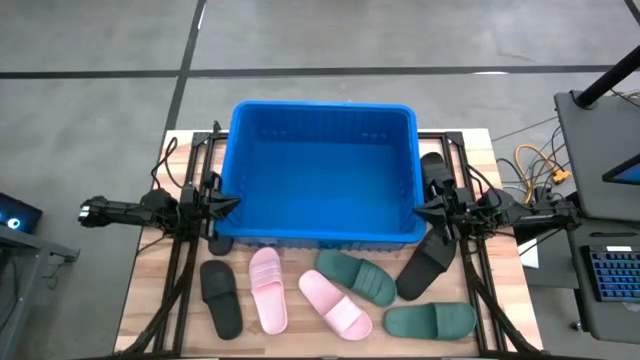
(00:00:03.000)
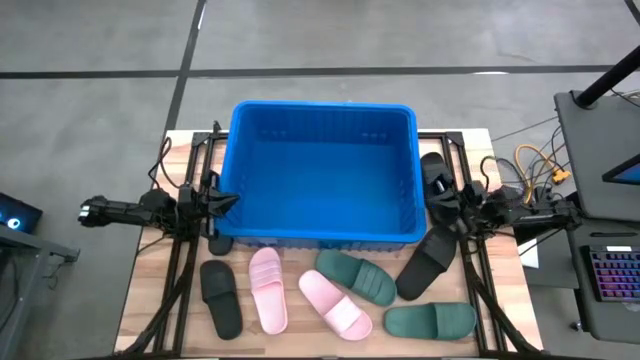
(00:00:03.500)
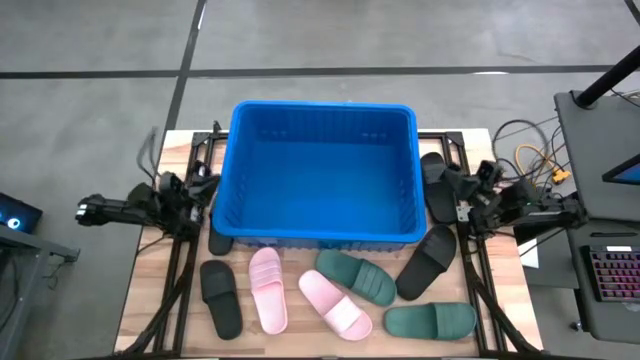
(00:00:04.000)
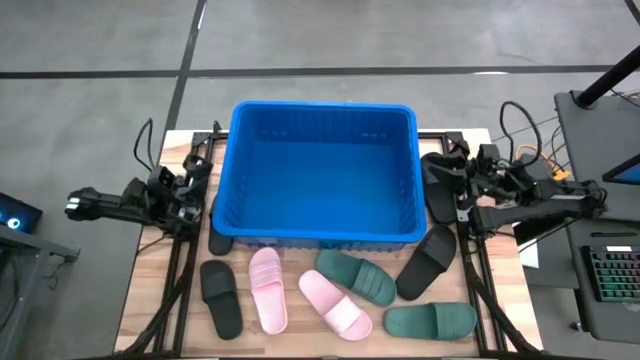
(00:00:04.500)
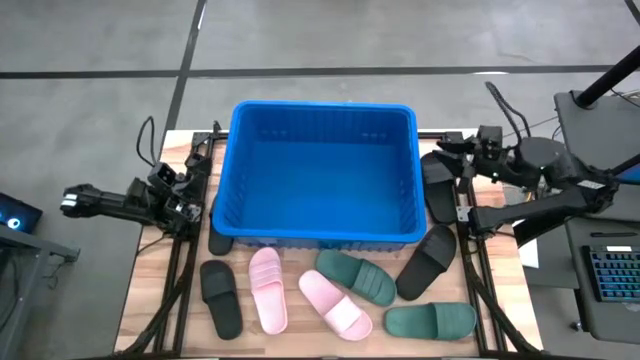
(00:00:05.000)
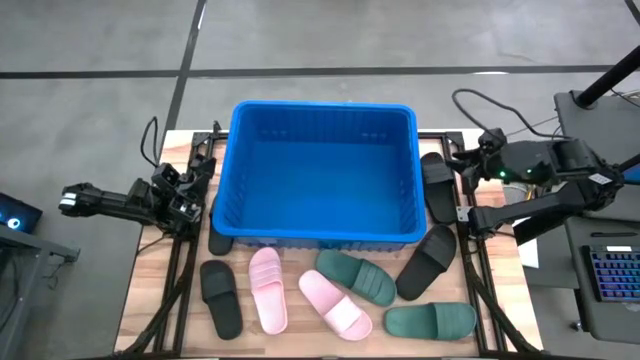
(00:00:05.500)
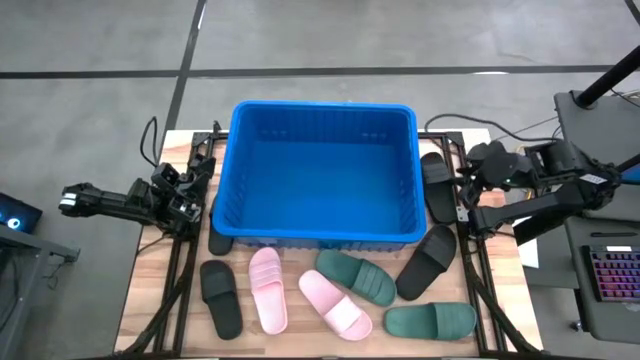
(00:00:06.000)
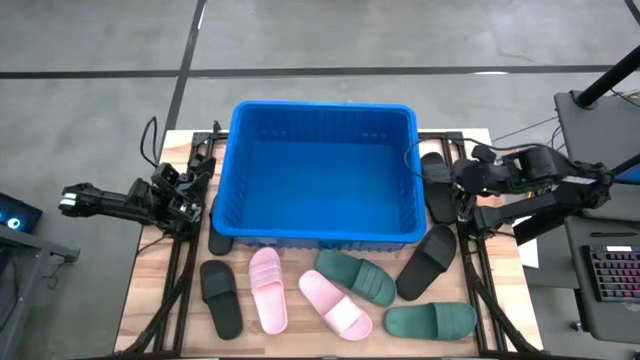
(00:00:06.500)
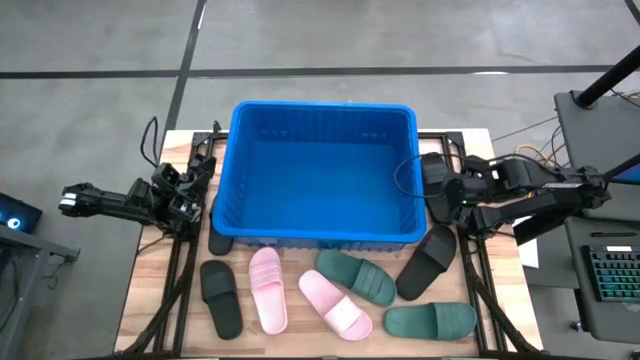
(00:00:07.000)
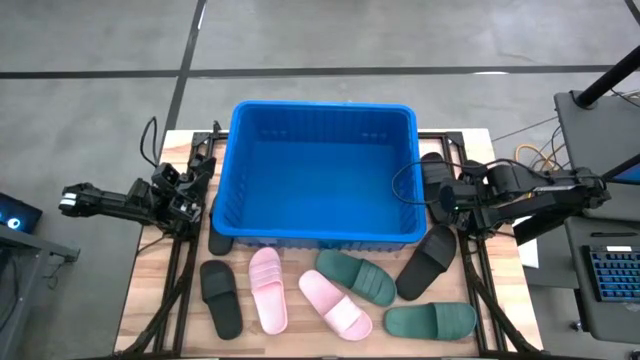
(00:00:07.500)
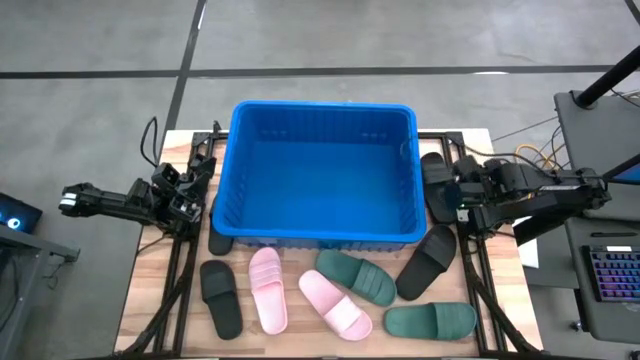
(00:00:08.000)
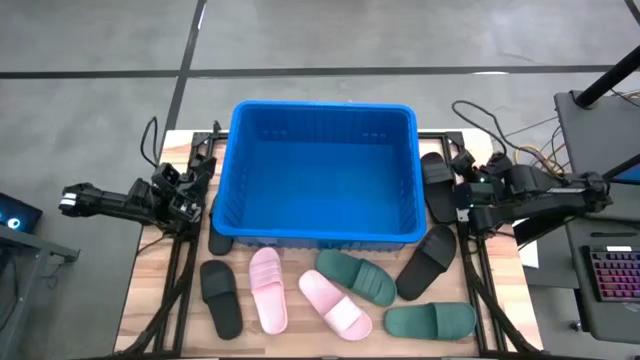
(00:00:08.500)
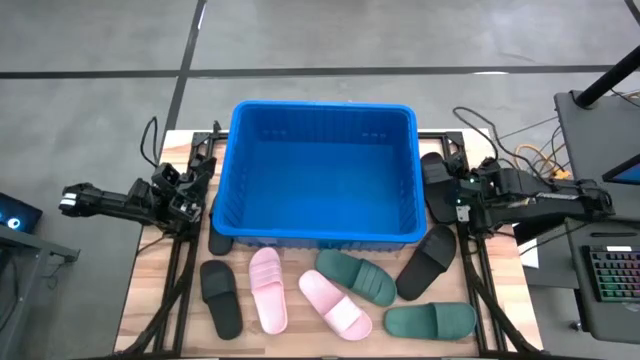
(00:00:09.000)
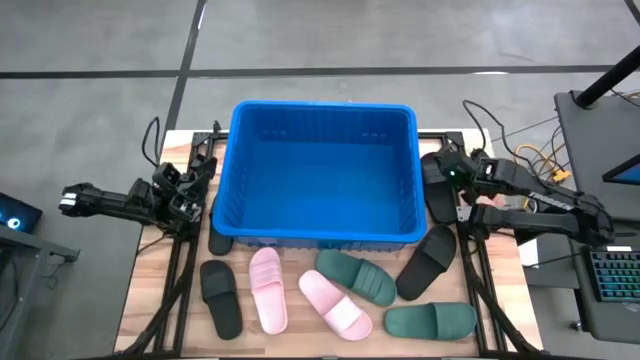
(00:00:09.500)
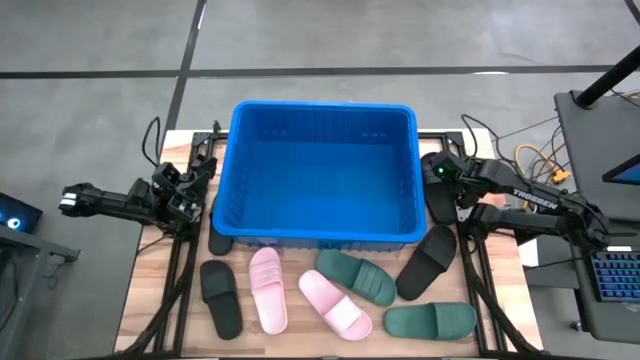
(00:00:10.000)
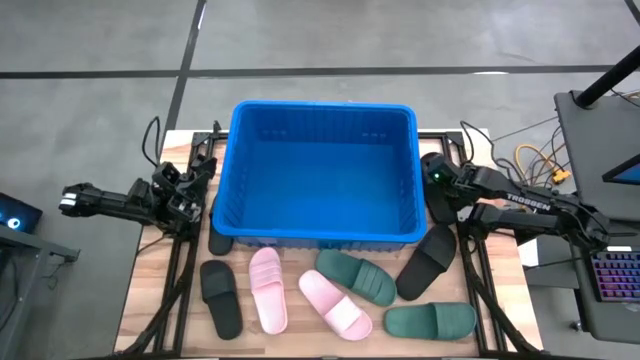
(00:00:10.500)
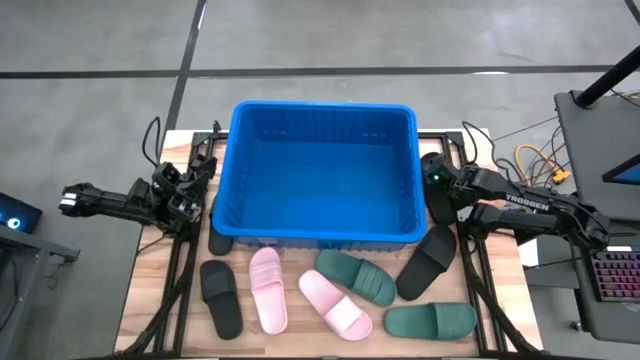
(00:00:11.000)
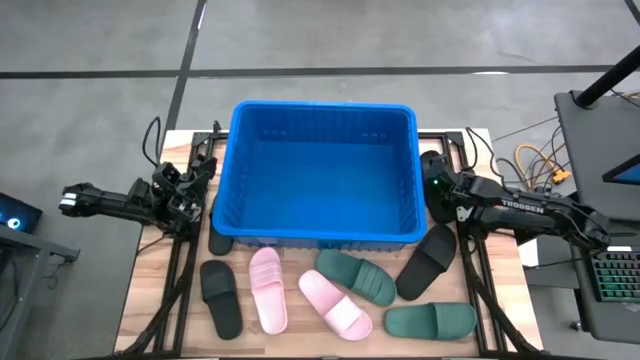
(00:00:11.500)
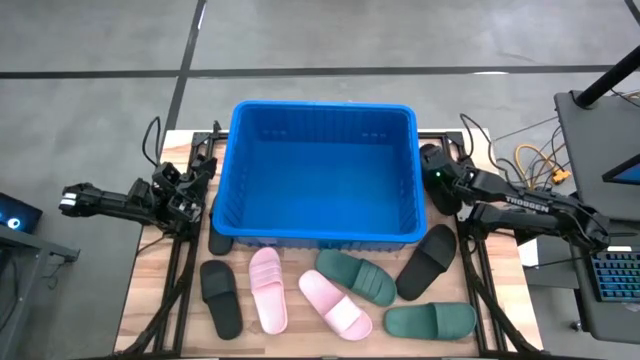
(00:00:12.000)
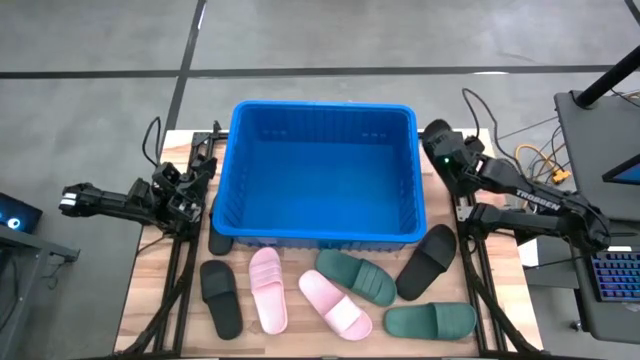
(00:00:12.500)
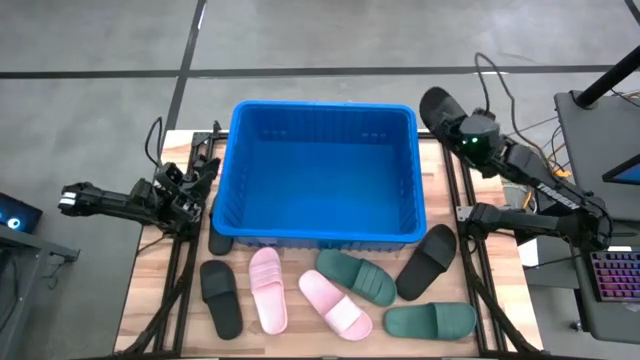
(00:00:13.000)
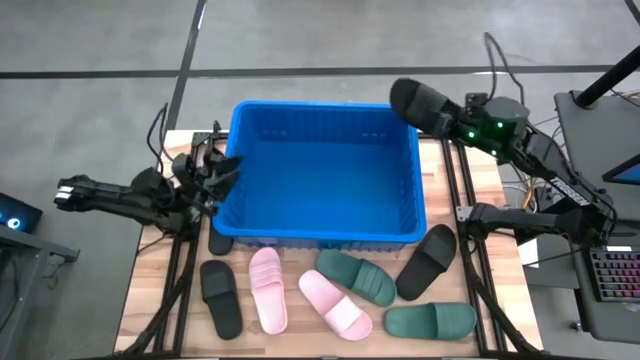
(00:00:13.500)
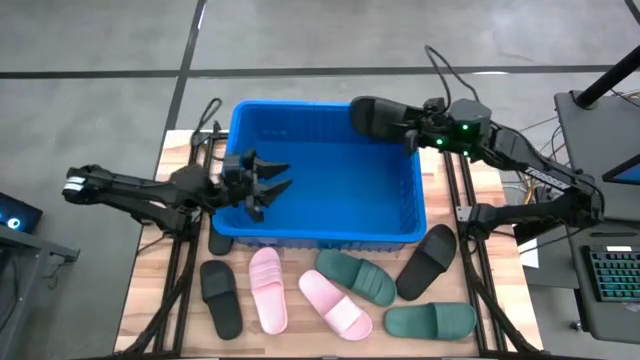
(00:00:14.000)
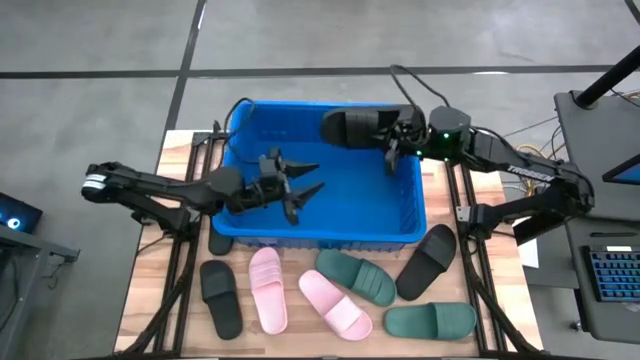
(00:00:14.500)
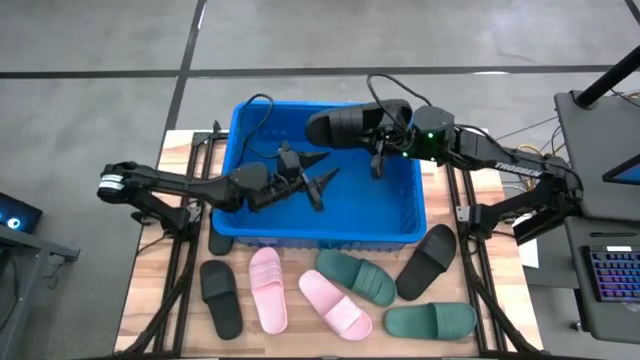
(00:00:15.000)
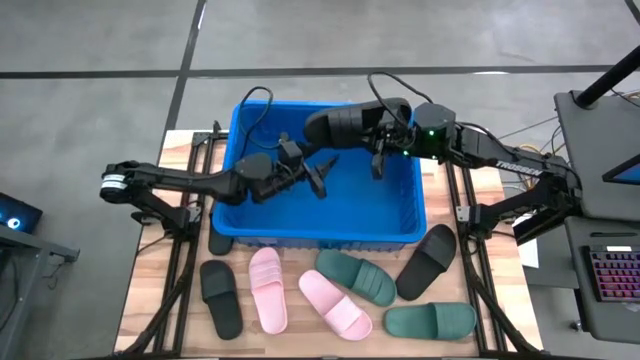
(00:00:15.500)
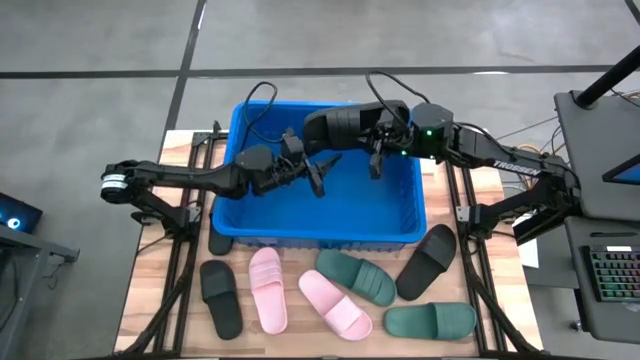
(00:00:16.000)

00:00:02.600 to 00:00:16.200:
Task: Pick and place slides into bin
Put the black slide into the blue bin

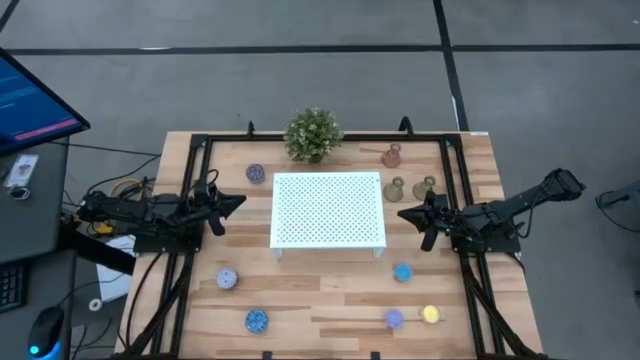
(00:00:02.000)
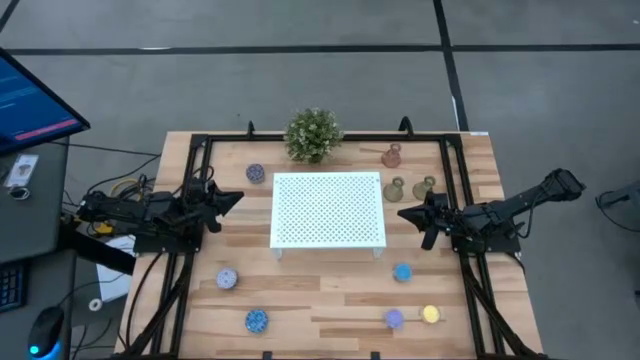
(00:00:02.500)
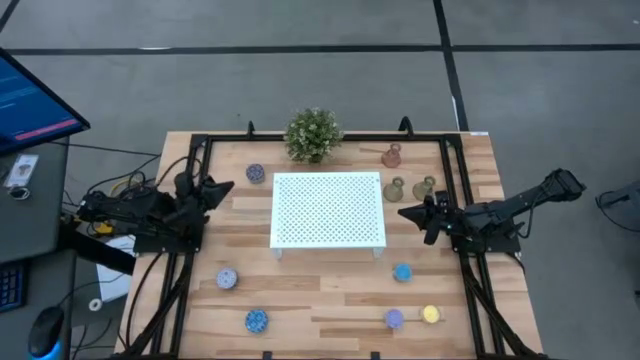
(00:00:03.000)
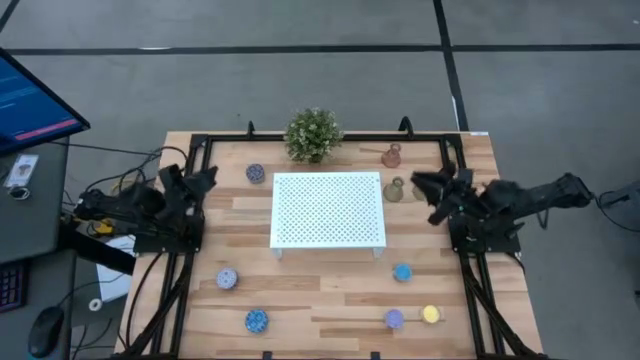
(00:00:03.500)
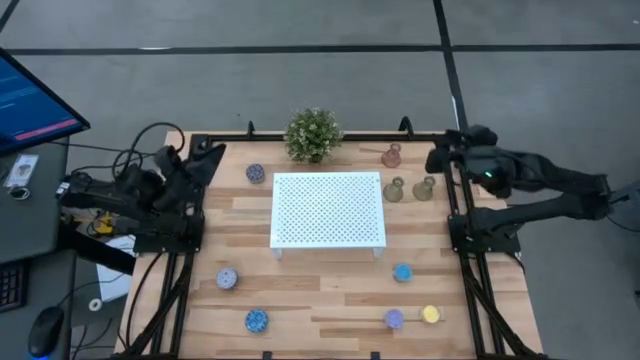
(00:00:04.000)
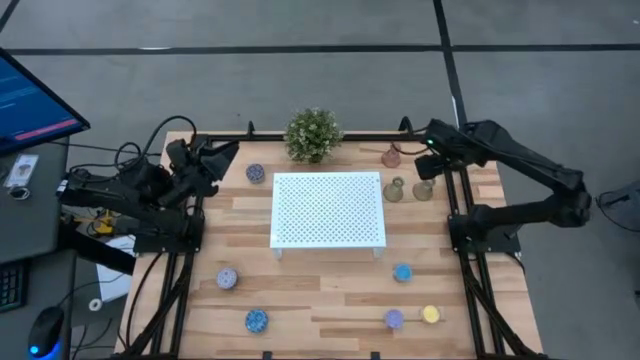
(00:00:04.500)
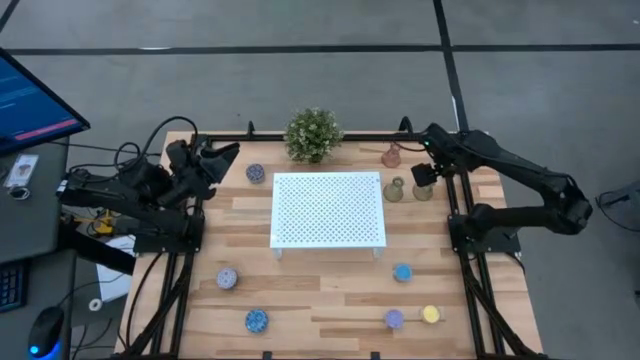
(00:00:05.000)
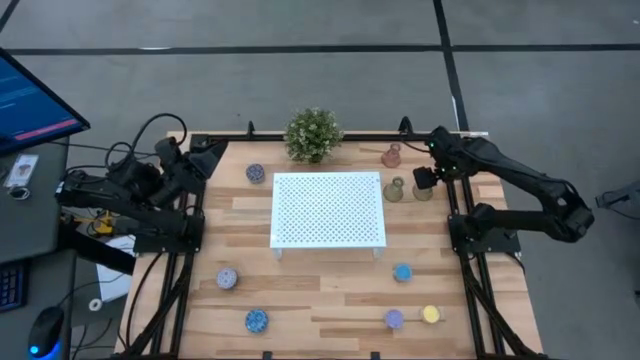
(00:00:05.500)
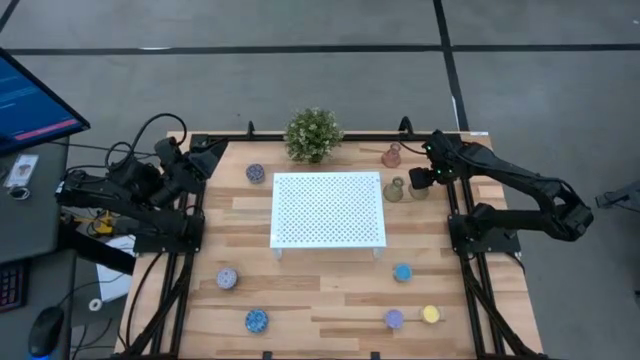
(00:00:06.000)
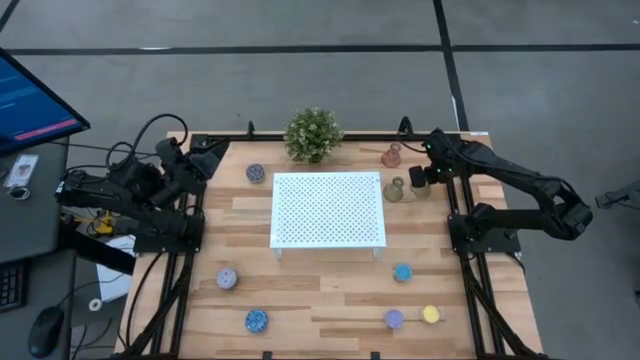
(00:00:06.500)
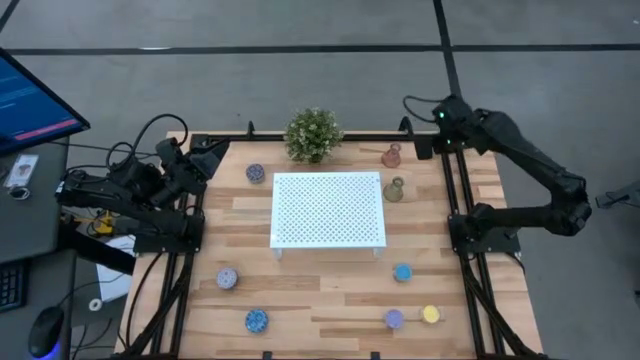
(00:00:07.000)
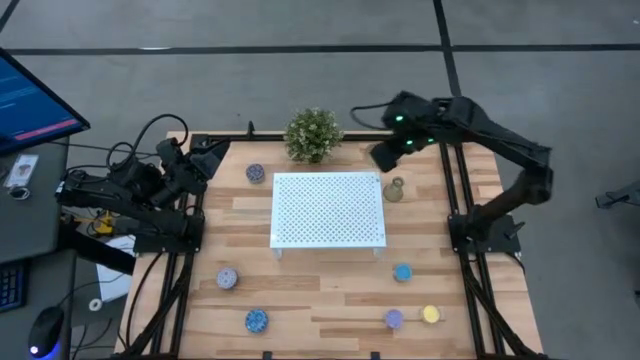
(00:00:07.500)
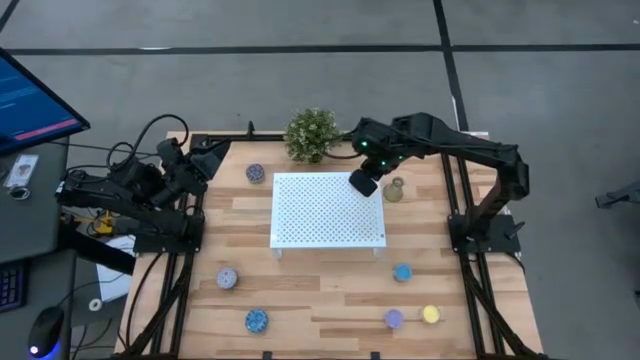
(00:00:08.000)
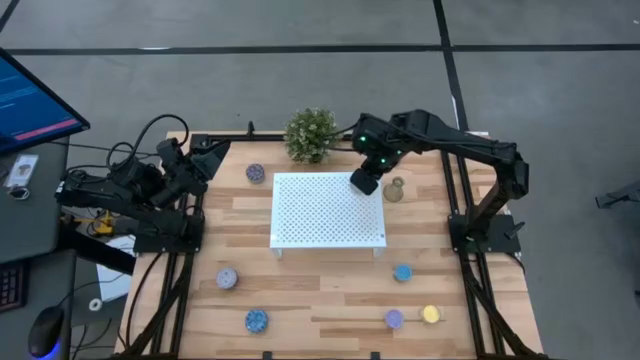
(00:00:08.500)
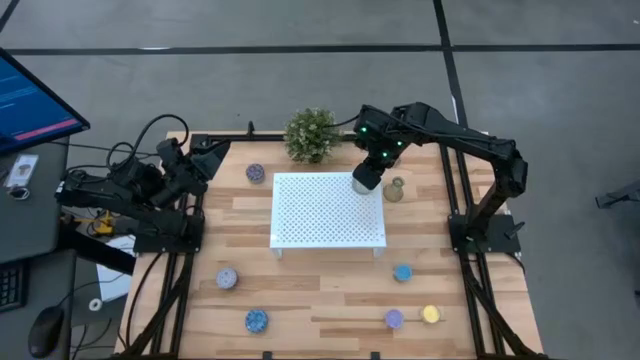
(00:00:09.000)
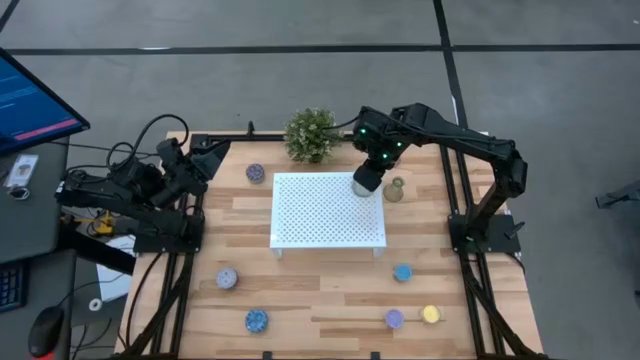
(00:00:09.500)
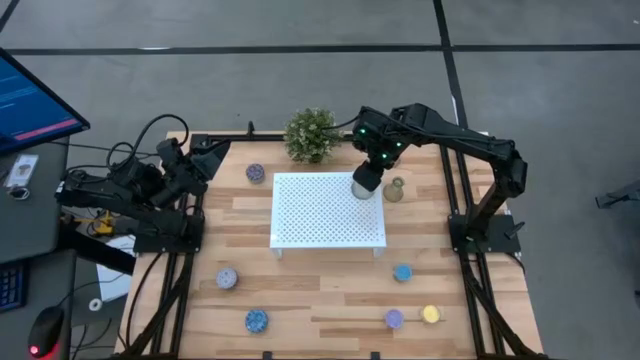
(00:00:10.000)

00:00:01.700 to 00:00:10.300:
Task: Pick & Place candle stick holders
Put the right green glass candle holder on the shelf
